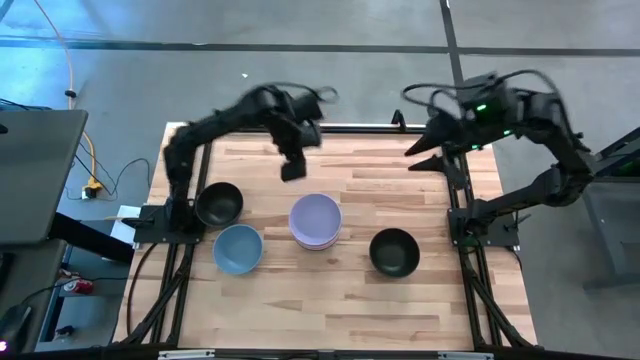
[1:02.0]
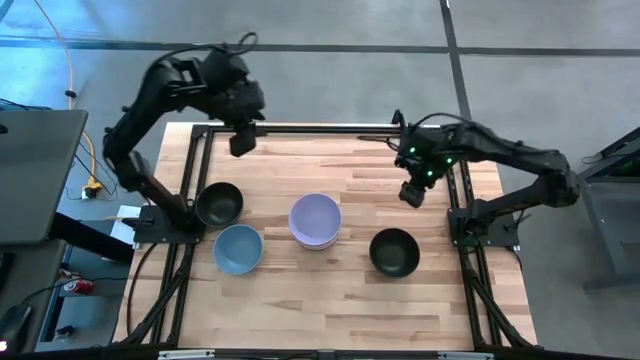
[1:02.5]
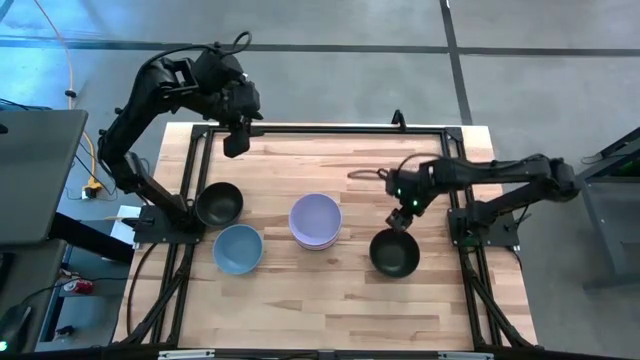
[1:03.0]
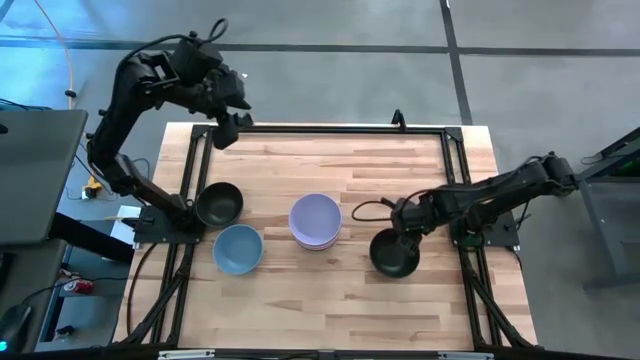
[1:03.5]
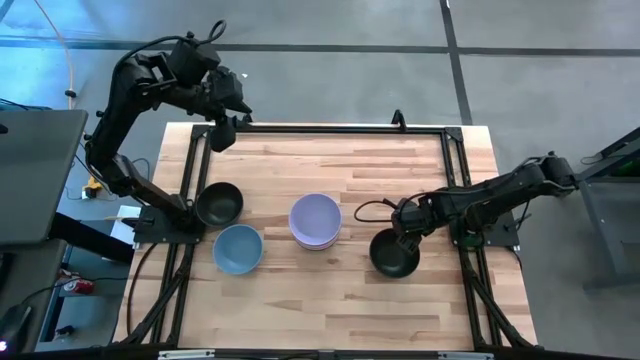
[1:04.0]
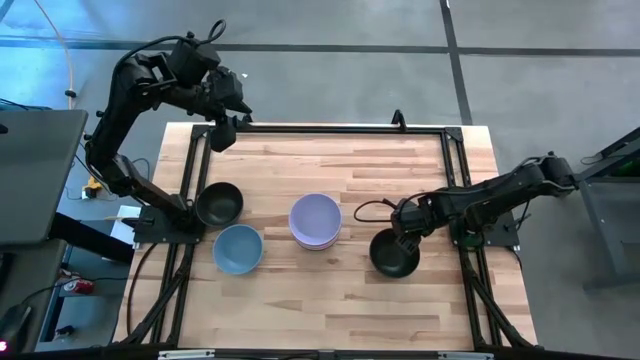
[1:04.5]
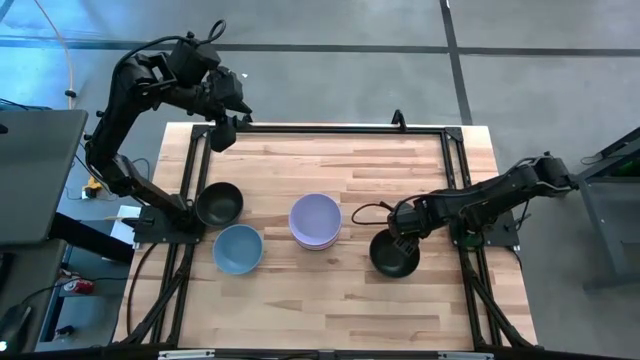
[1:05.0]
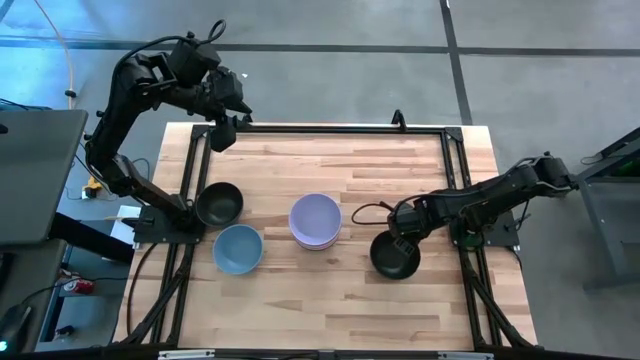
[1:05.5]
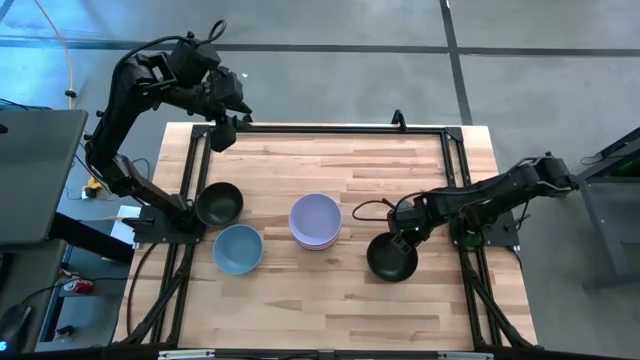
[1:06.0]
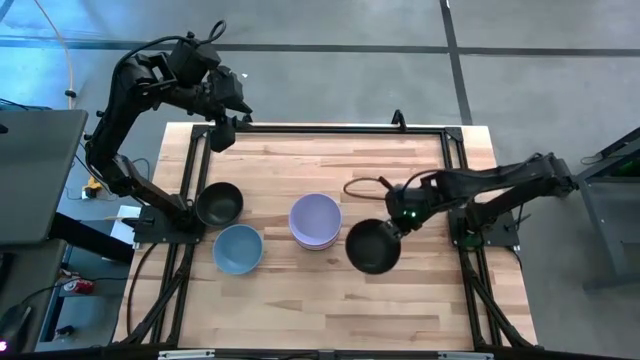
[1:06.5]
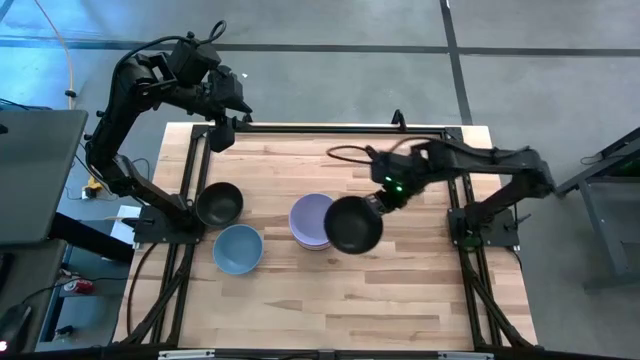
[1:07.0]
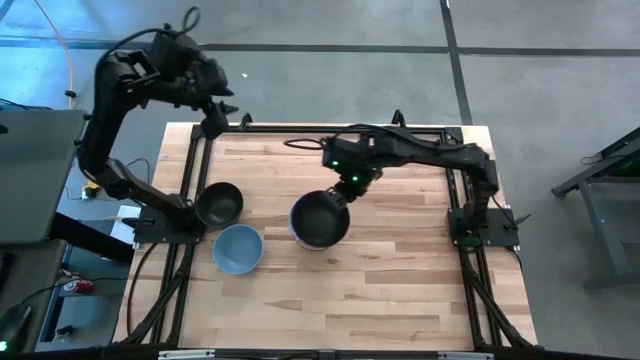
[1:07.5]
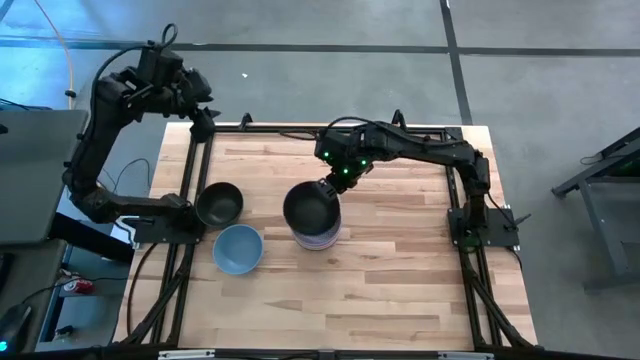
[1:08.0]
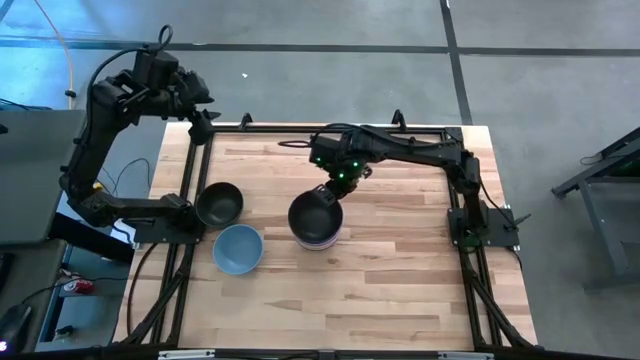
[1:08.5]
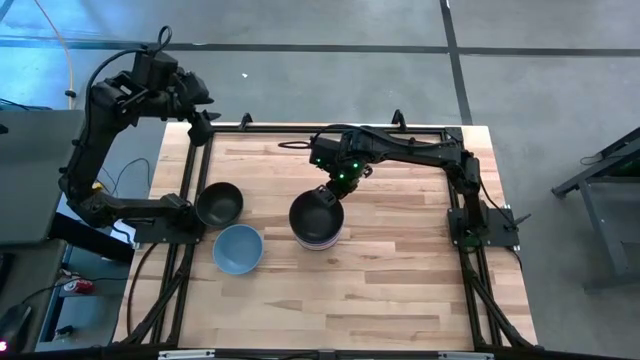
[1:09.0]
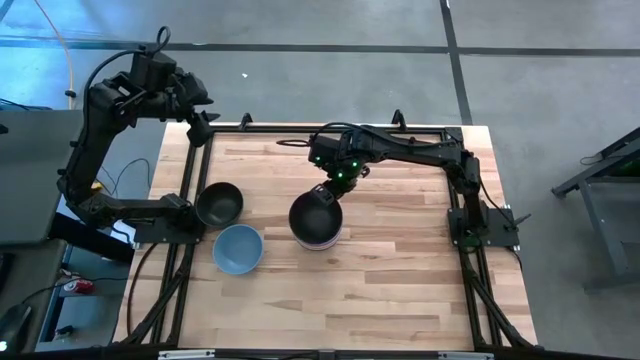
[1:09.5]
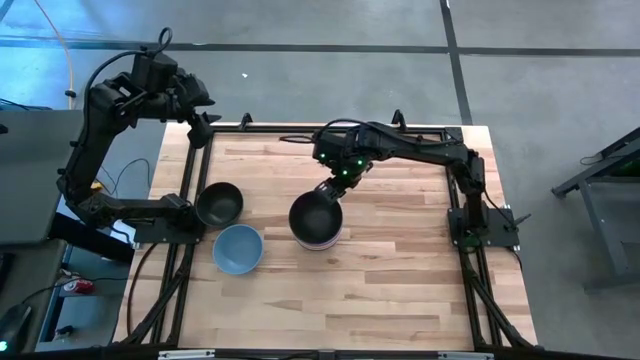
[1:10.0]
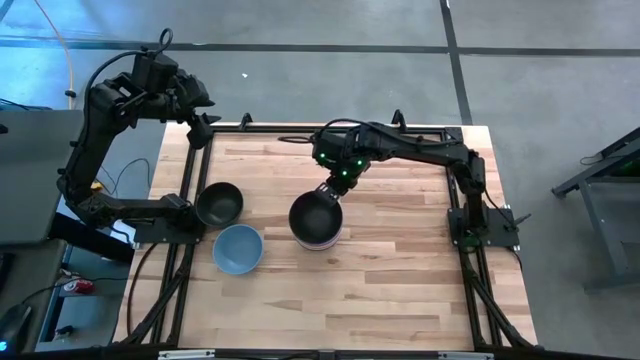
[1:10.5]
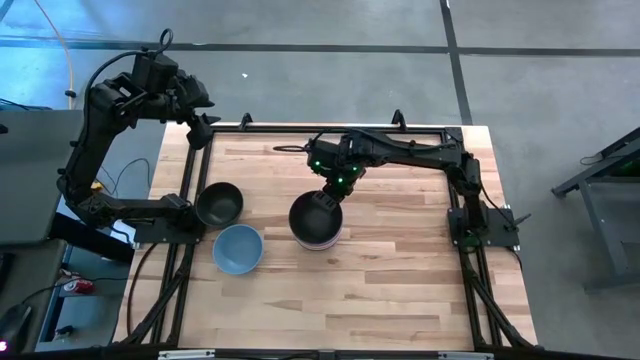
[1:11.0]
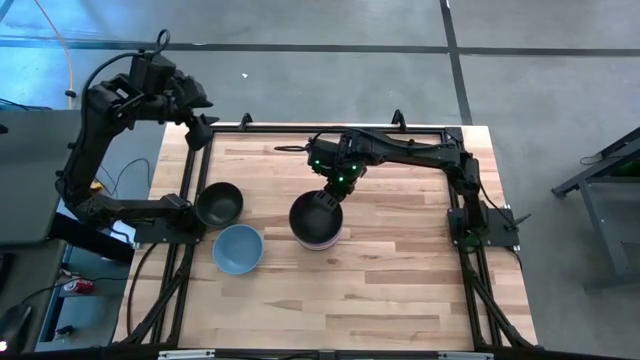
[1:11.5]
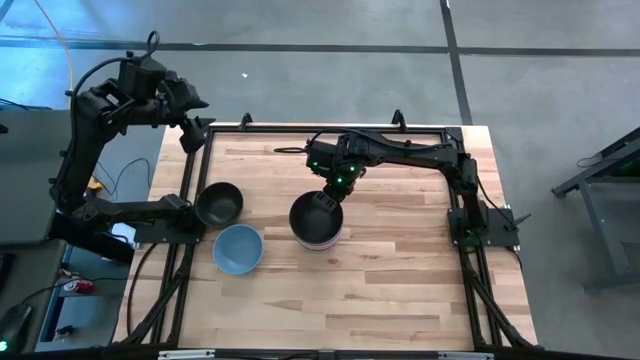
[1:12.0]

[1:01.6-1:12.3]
Task: Nest bowls inside each other
Stack the right black bowl on top of the purple bowl

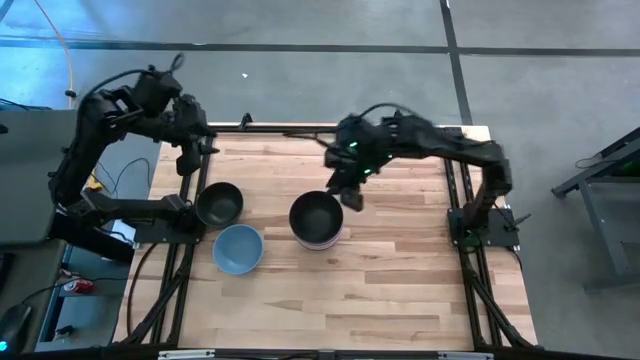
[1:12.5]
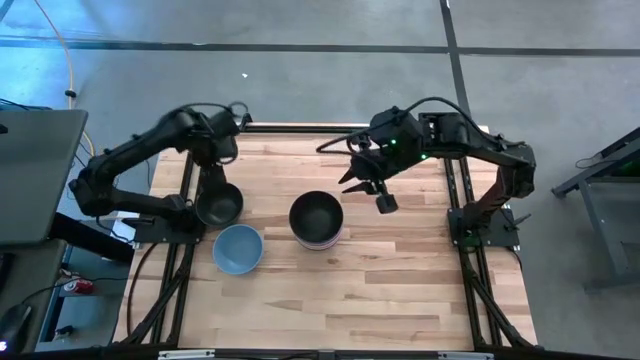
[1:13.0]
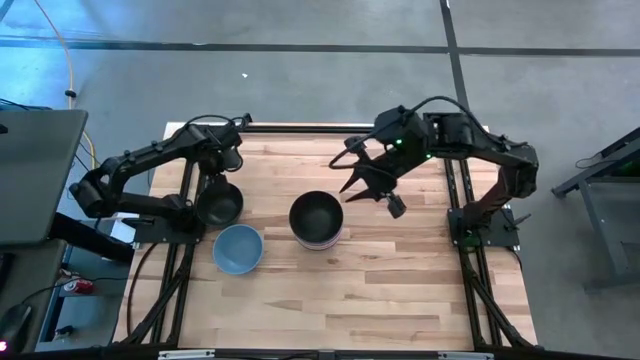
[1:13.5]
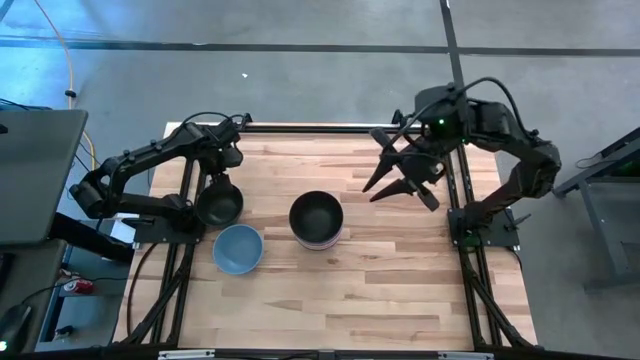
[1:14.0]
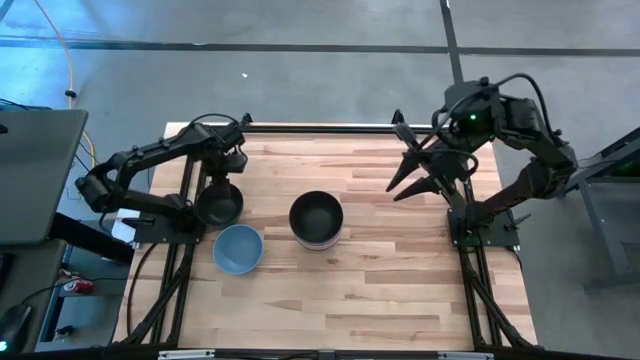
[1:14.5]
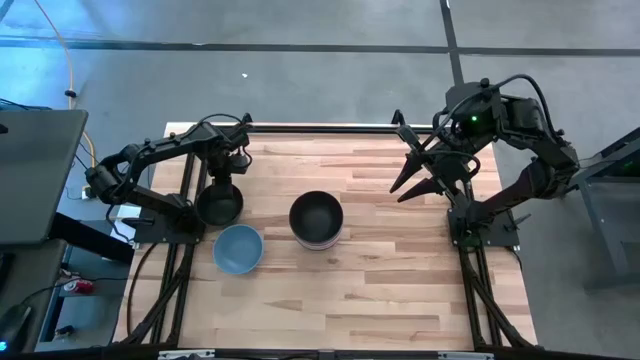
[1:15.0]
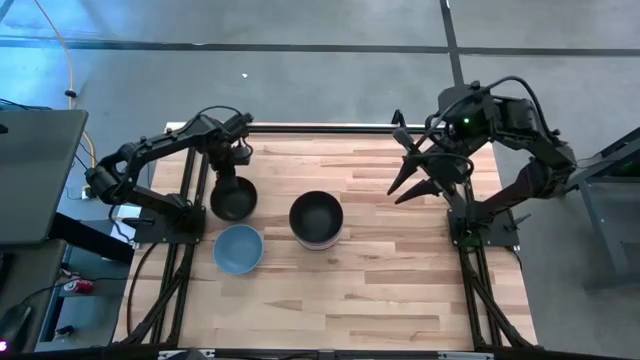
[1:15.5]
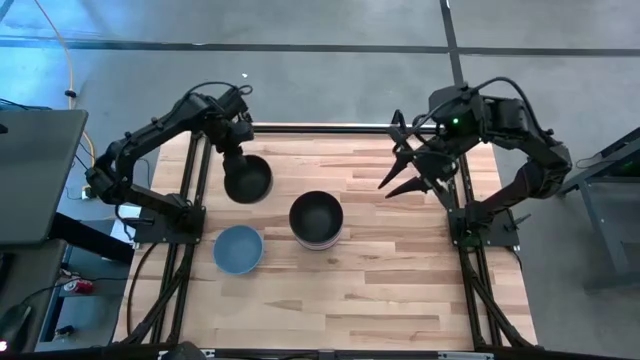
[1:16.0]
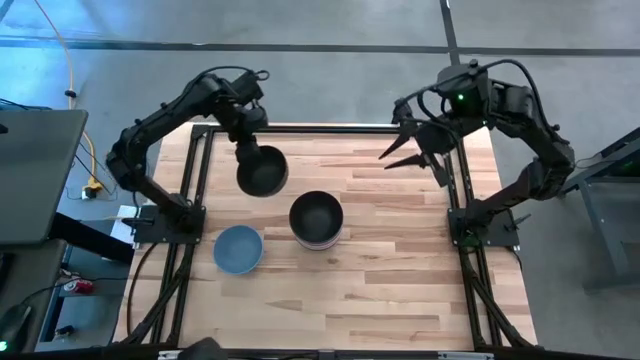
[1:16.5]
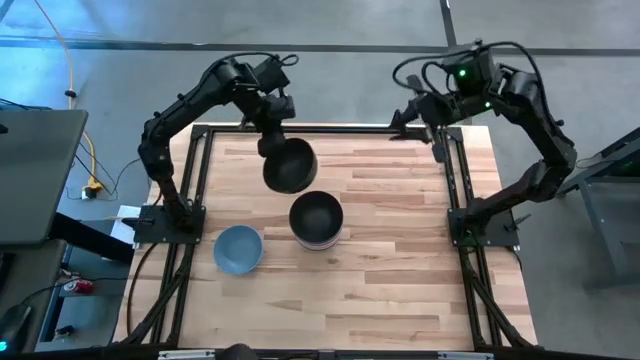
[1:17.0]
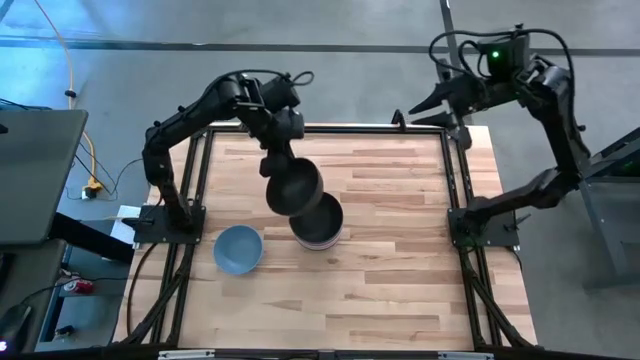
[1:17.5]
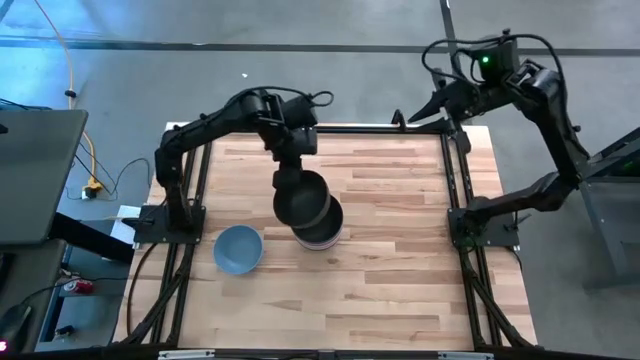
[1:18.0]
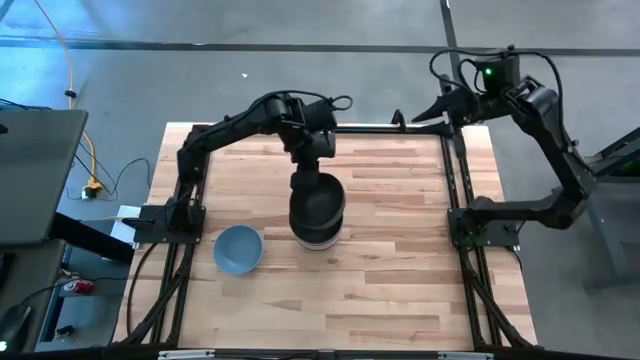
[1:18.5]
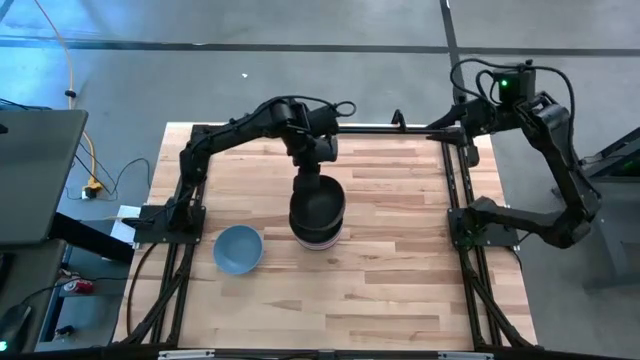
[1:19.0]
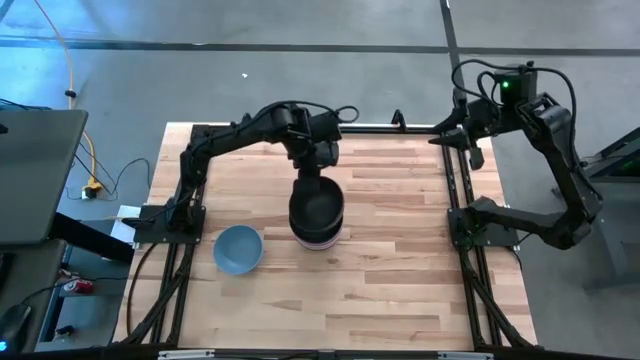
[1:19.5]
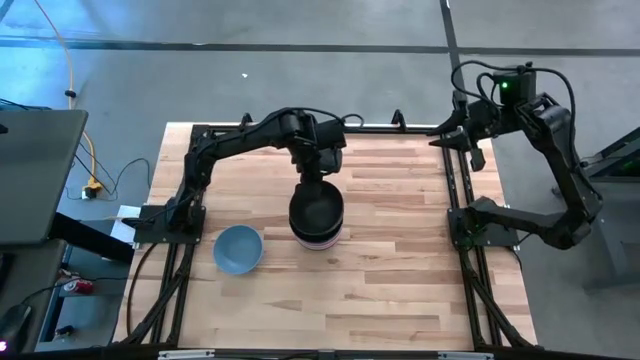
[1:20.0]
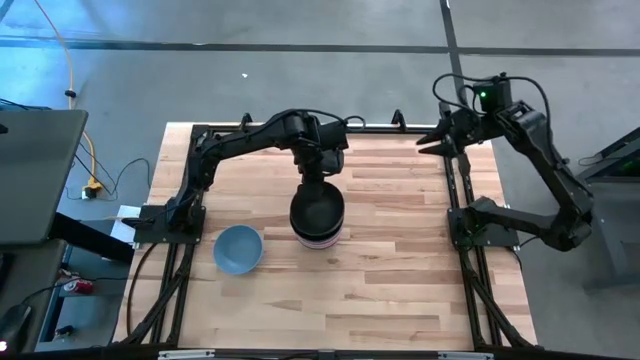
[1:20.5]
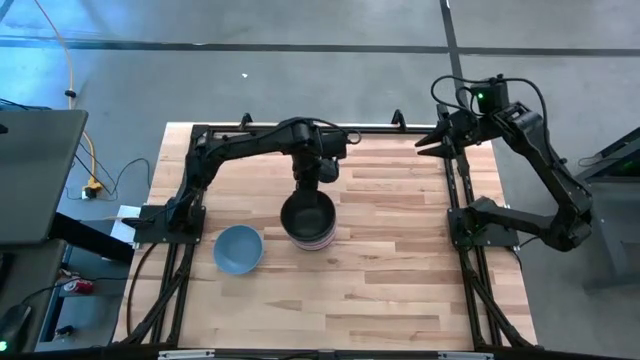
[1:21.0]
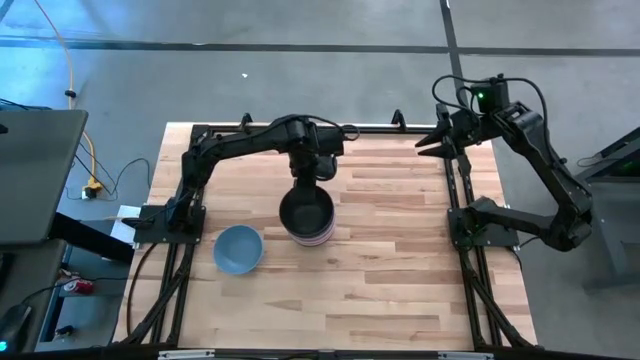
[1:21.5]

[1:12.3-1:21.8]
Stack the left black bowl on top of the black bowl

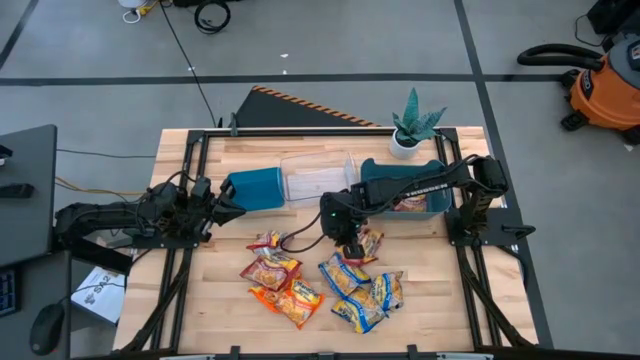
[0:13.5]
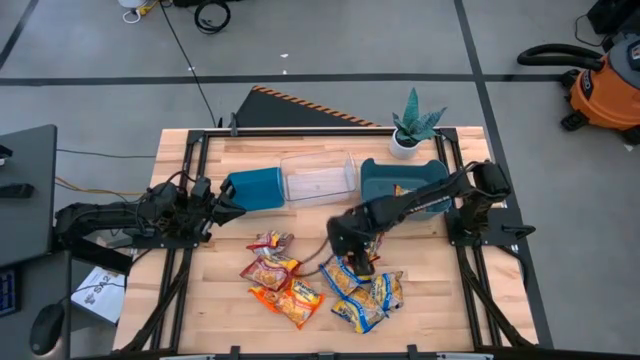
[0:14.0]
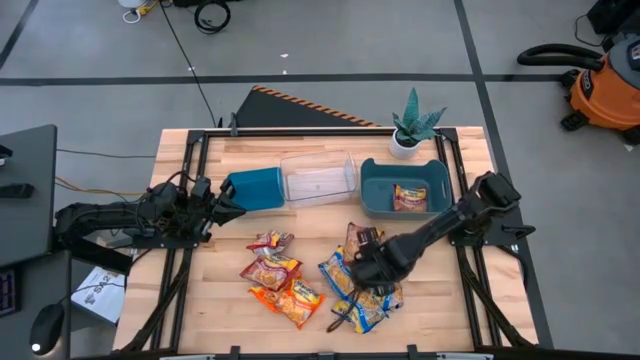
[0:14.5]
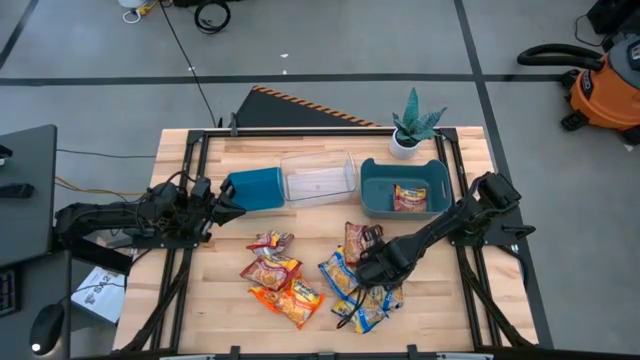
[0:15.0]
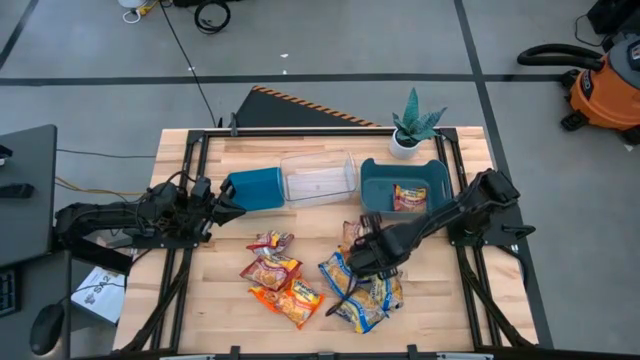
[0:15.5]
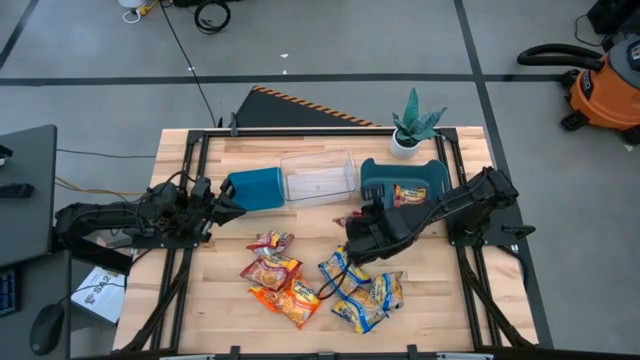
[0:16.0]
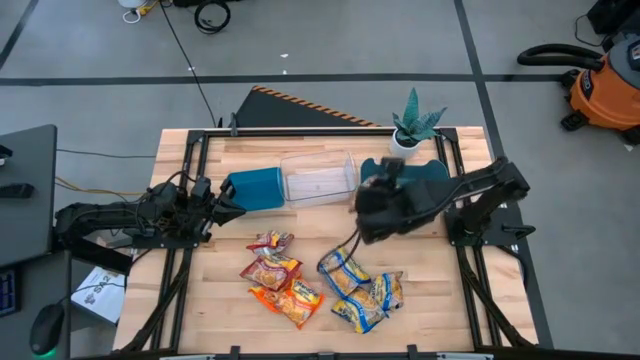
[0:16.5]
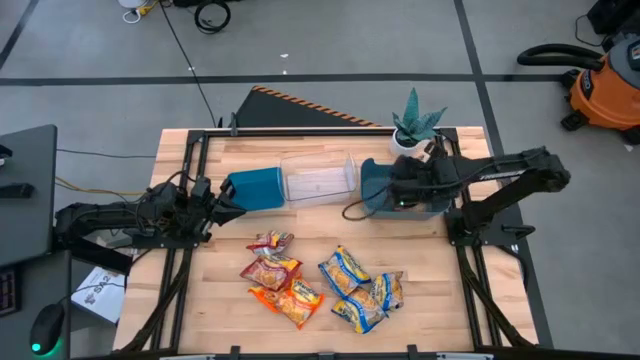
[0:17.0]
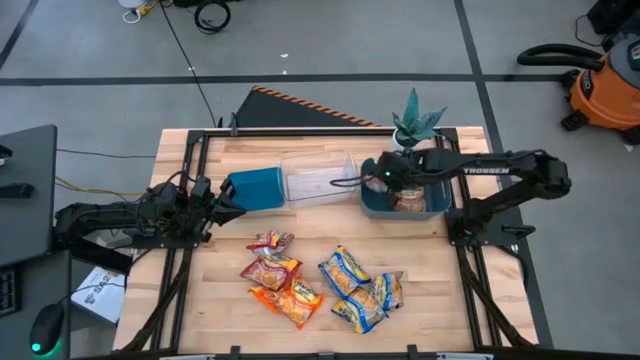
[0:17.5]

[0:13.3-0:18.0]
Task: Sort Maruchan noodles
Put the bottom right red noddle pack into the dark blue bin
